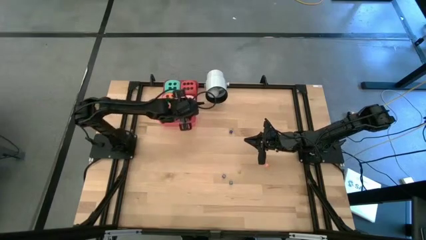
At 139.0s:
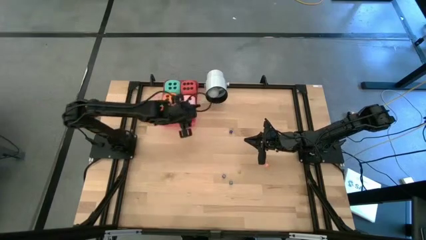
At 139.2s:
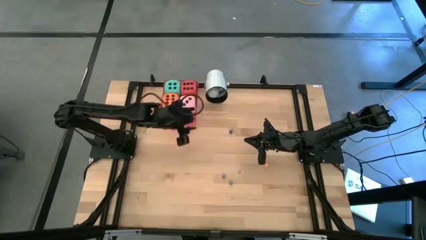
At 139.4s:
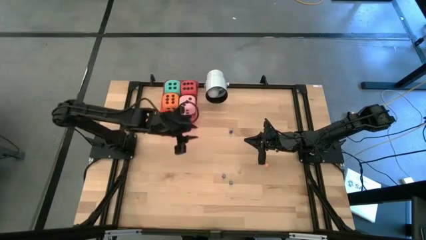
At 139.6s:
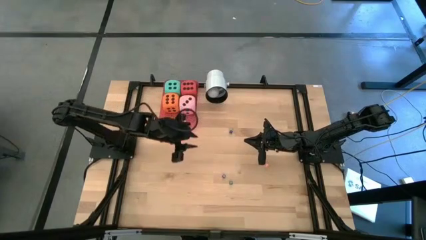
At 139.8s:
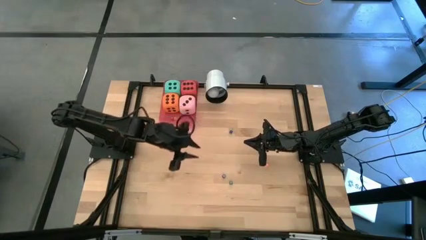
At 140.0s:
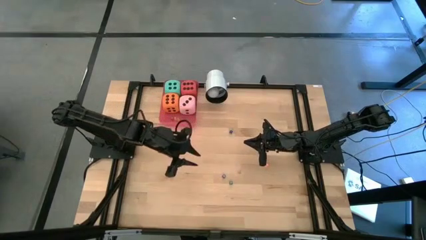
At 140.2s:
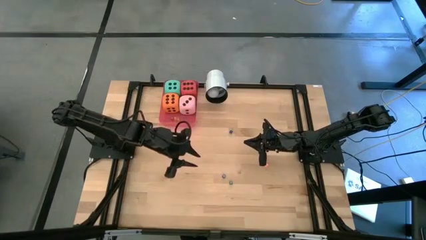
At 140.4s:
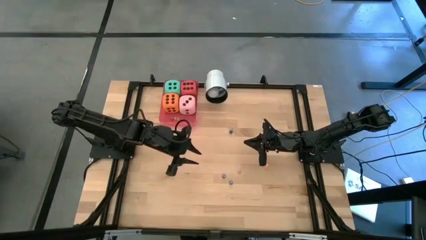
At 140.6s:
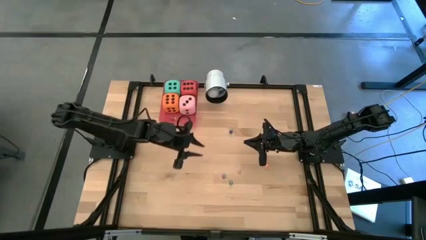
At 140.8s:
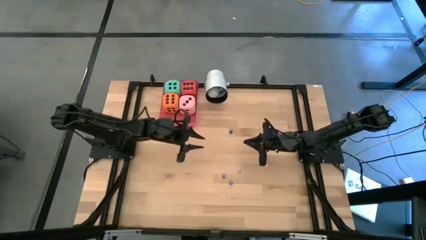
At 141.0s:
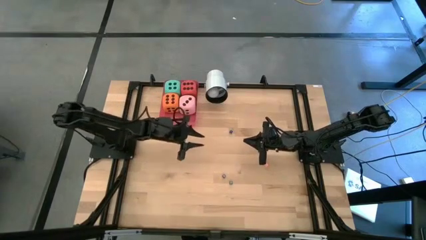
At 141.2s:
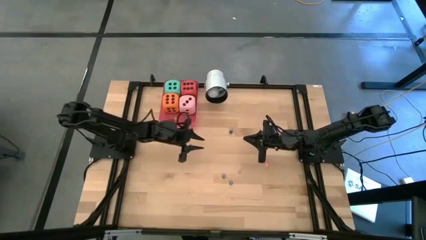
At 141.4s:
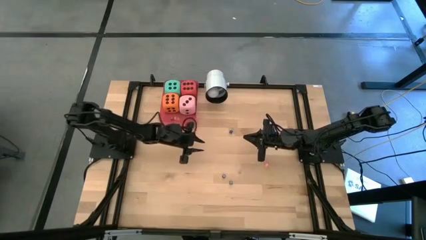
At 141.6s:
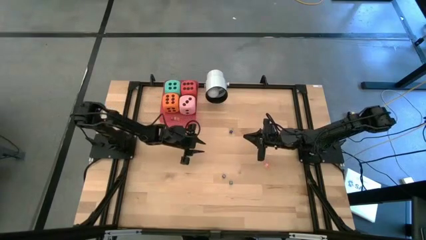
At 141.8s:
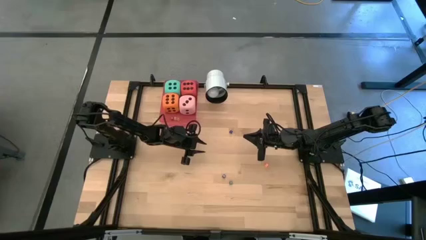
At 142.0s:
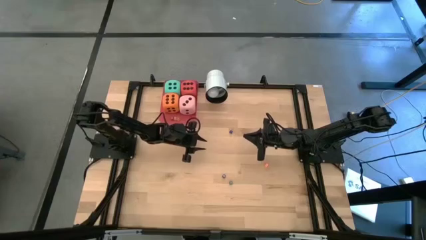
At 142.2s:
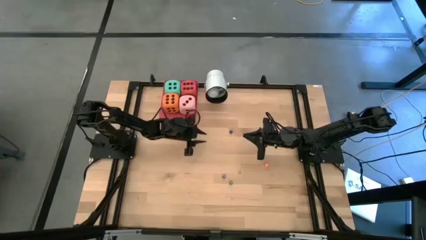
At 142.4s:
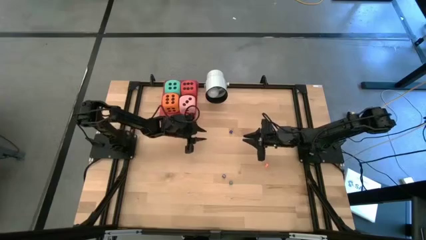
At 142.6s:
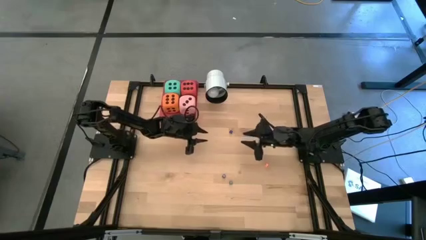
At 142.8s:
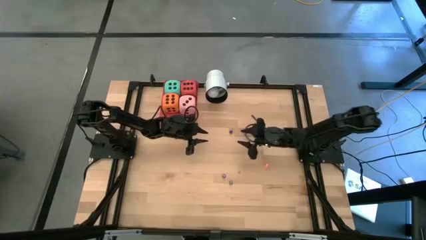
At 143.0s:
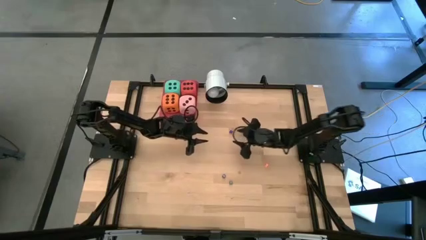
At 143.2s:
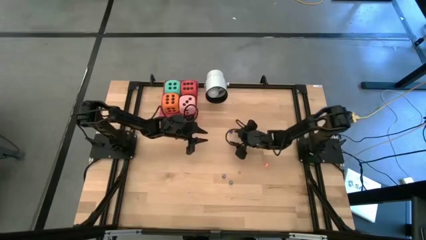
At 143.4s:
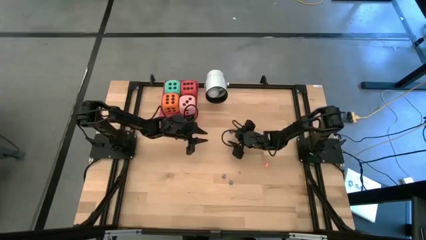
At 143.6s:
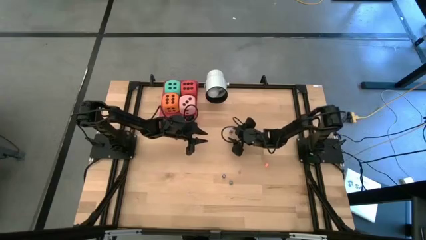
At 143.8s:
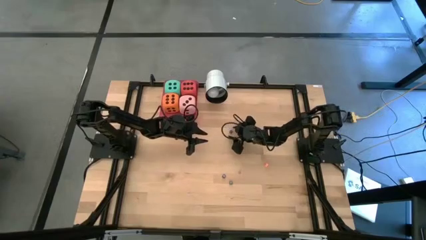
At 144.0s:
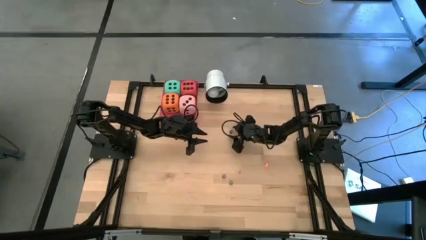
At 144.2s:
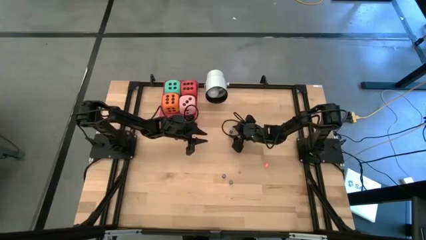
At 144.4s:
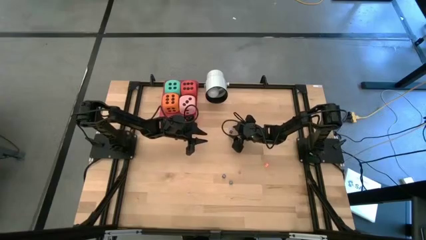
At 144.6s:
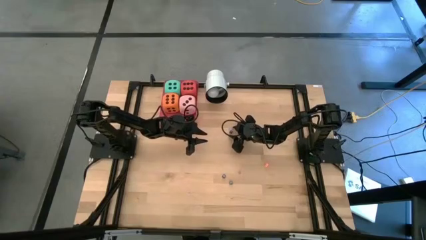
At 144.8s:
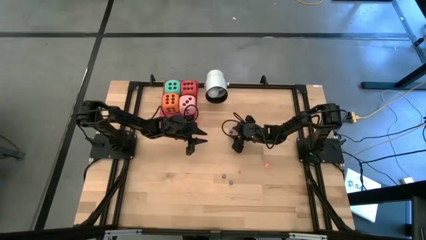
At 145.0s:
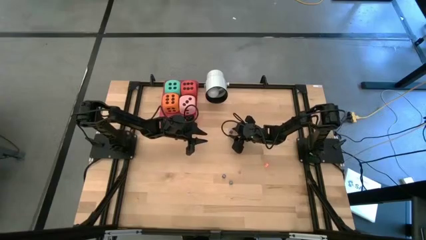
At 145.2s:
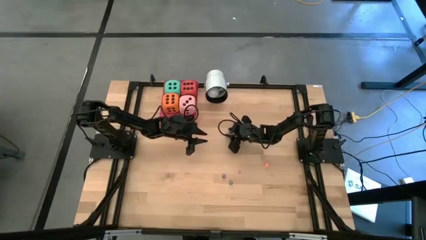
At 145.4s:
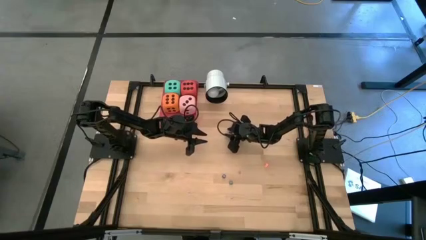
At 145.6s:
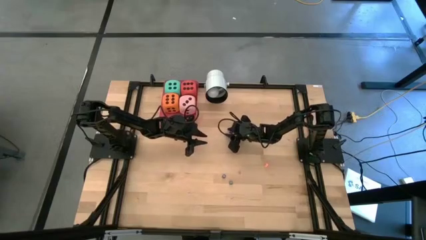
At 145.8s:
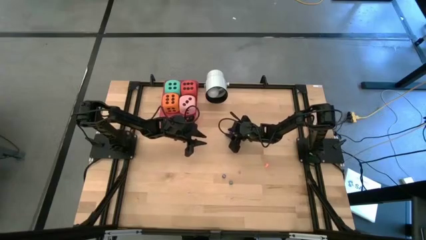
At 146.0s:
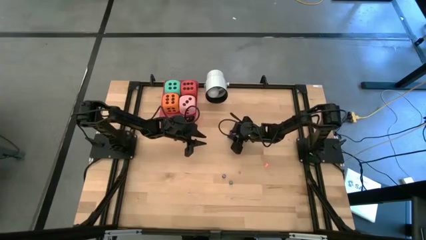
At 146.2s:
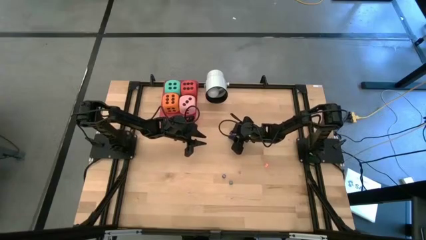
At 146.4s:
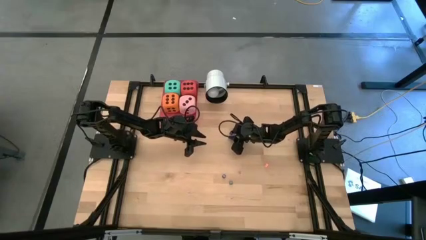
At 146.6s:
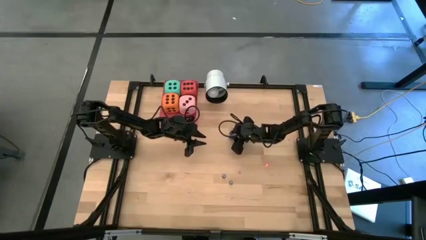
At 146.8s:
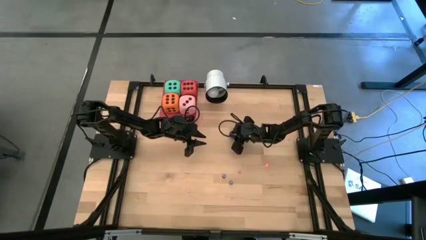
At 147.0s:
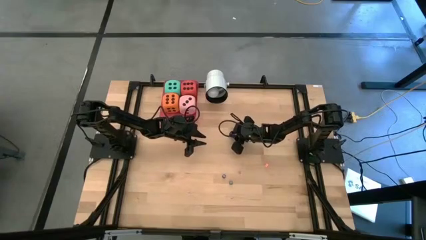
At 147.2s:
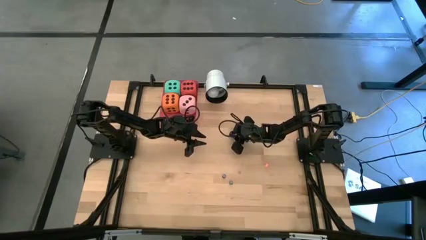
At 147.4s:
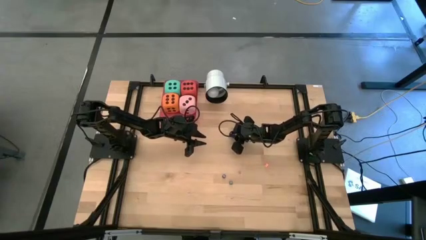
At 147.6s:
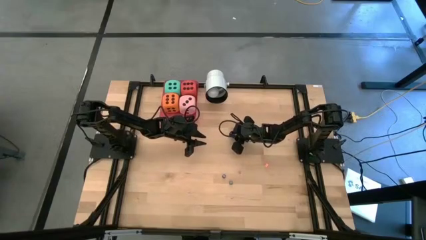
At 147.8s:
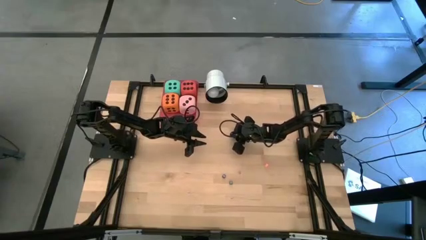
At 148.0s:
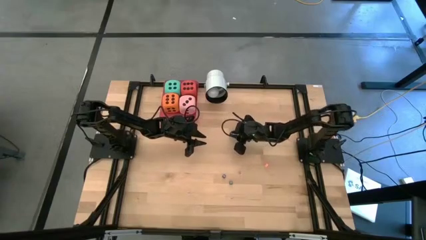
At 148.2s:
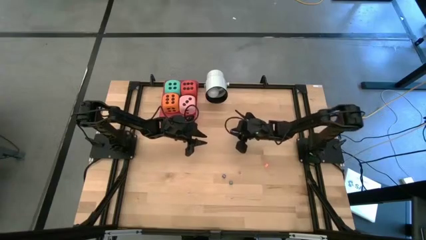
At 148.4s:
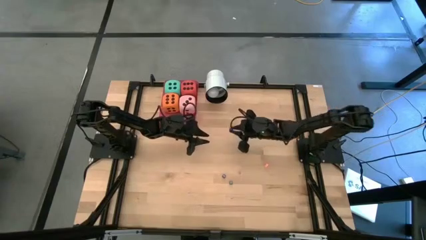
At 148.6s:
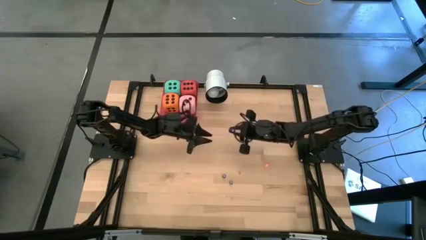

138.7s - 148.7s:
Task: Pick & Place Dice
Put the top small blue dice into the red bin

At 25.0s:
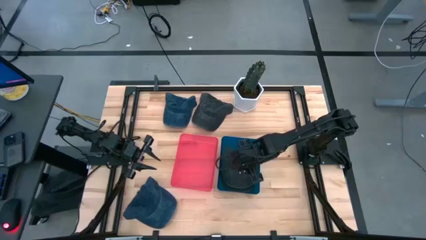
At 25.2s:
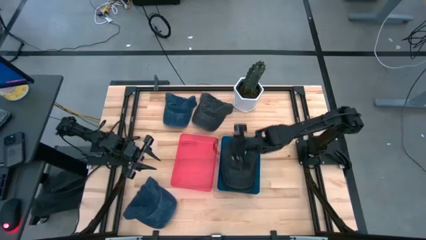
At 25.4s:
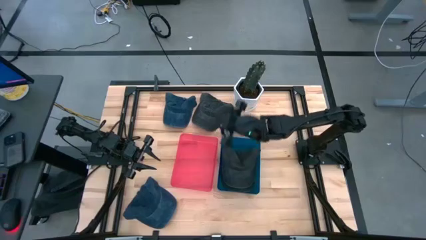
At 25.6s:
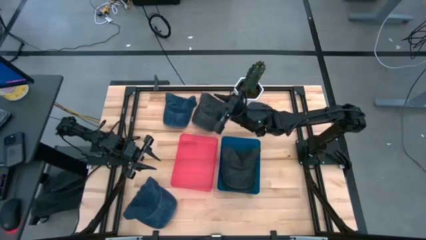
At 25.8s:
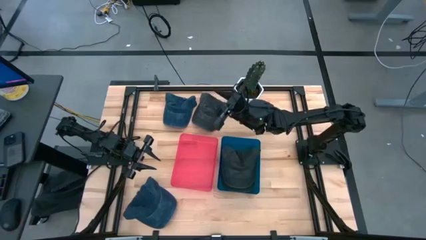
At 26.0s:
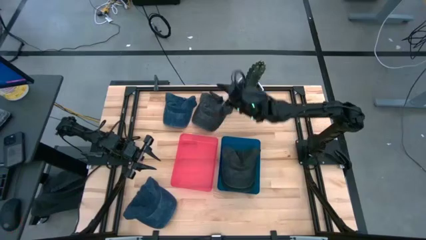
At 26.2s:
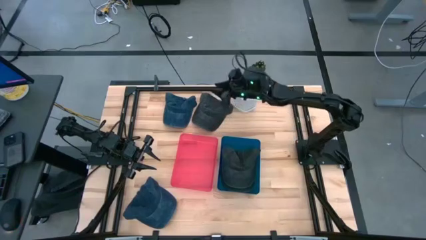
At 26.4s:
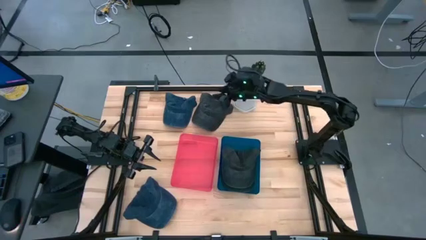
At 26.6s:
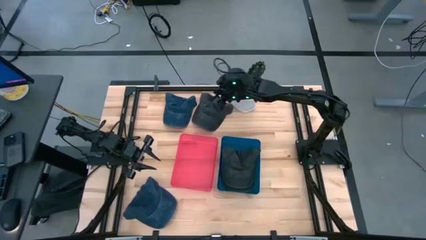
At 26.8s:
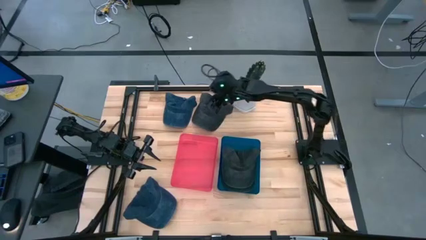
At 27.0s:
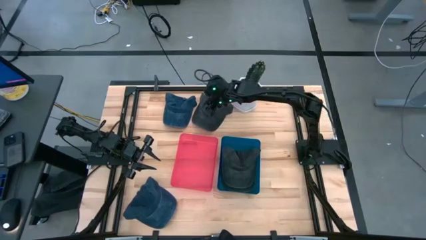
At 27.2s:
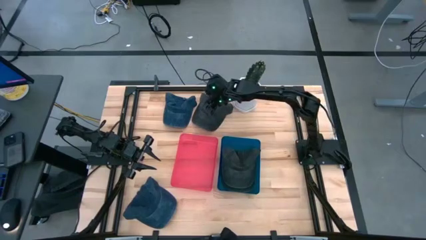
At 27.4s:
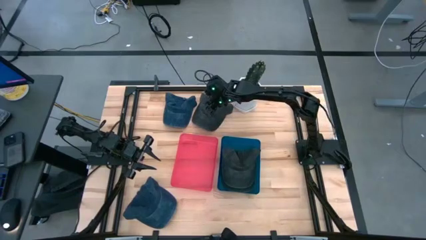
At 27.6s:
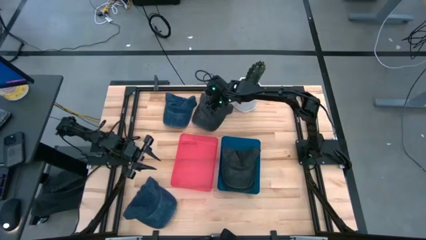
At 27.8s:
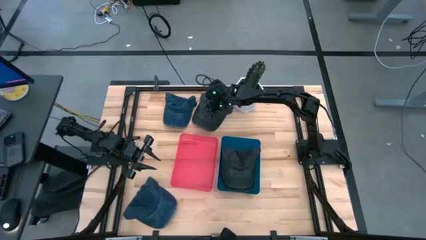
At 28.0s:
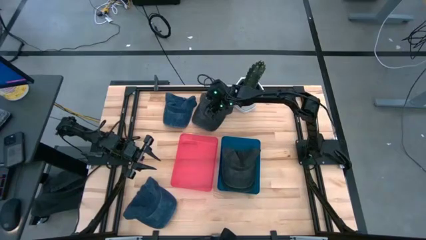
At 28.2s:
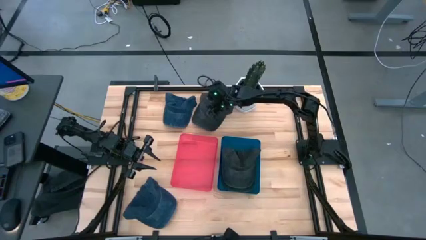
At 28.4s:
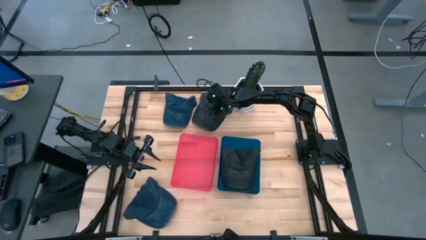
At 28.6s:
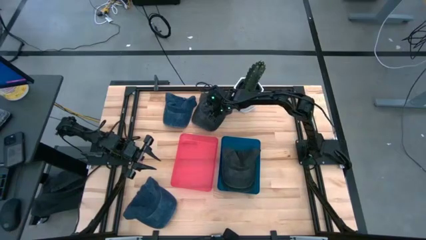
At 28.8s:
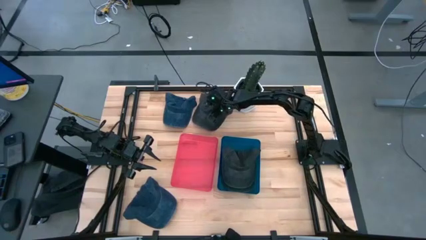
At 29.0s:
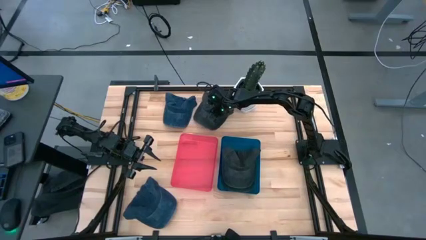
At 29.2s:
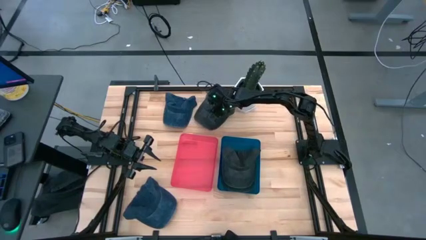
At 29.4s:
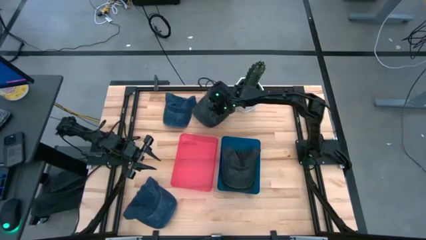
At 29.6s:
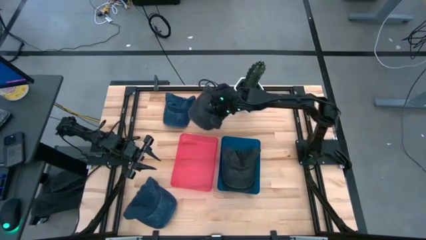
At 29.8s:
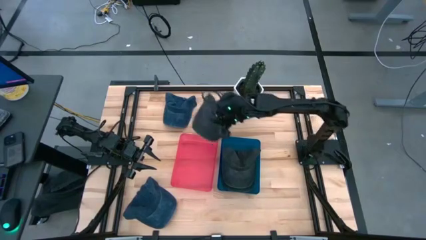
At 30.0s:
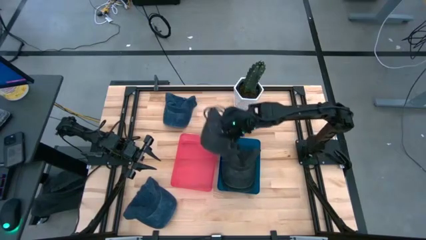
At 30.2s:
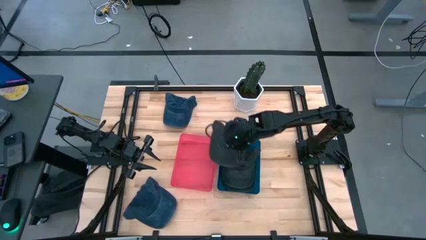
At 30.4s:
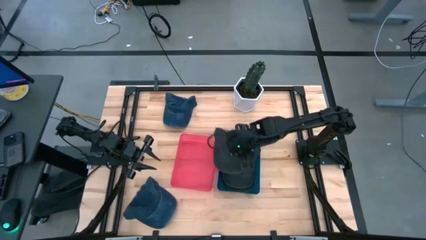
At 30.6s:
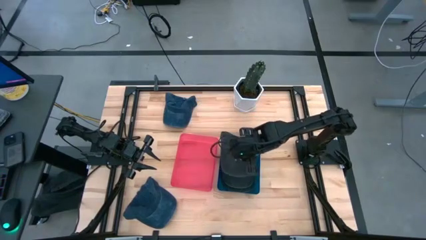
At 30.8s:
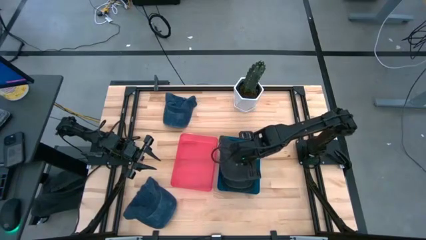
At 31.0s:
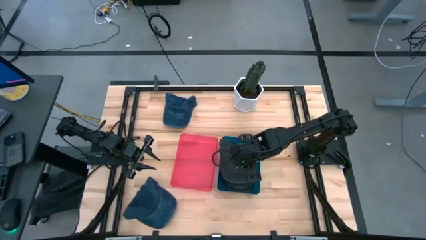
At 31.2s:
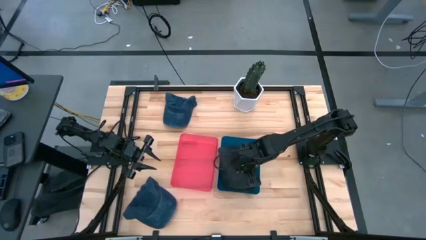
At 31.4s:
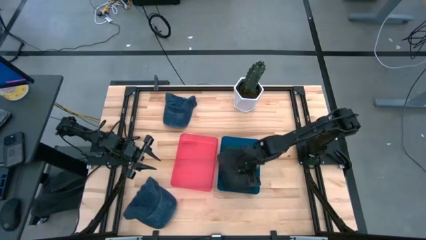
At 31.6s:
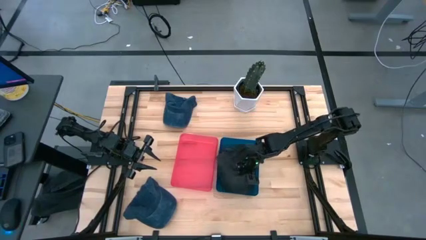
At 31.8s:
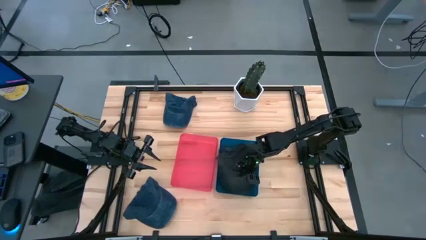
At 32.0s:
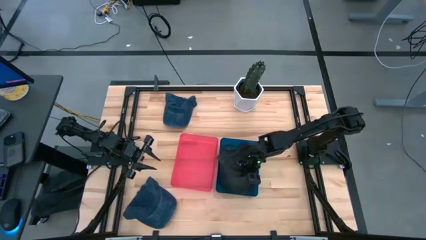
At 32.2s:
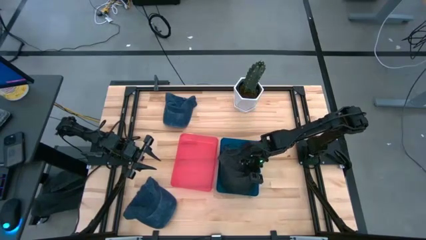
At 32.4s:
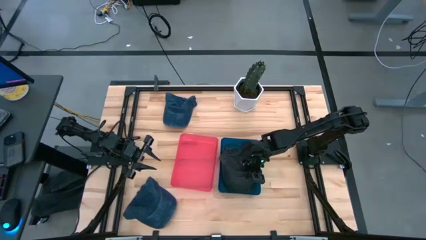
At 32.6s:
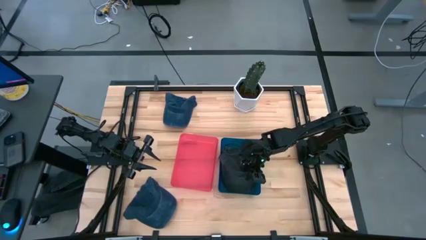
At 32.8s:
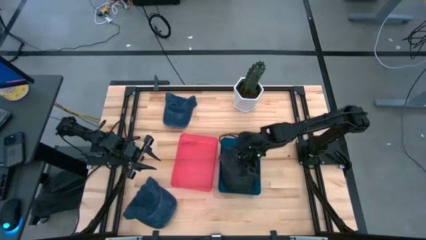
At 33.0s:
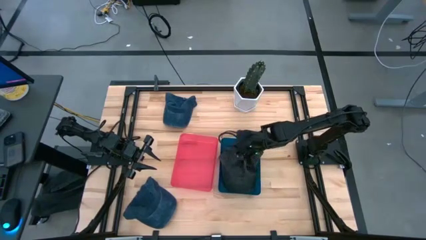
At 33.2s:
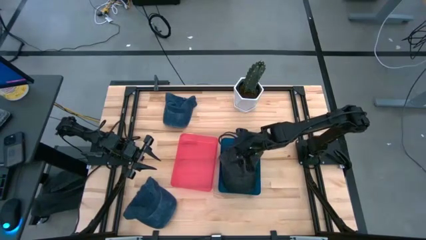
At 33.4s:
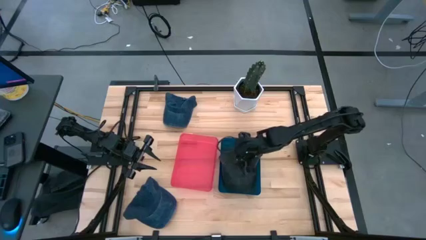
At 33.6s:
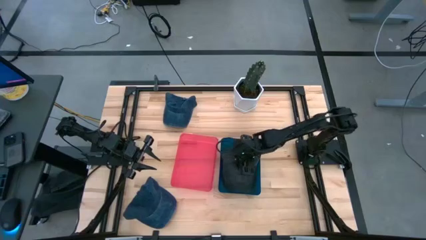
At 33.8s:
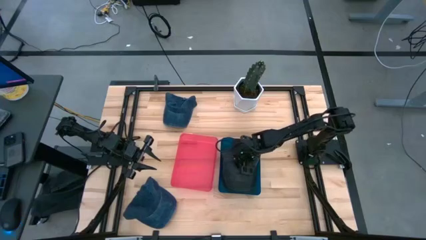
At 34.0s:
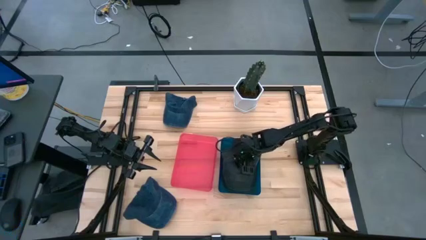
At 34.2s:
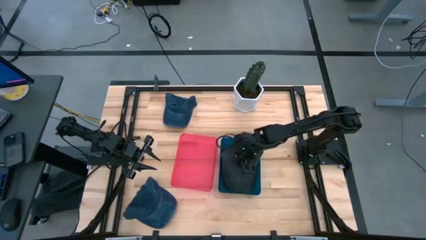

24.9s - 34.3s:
Task: Pick & Place hat
Put the black cap into the blue bin
